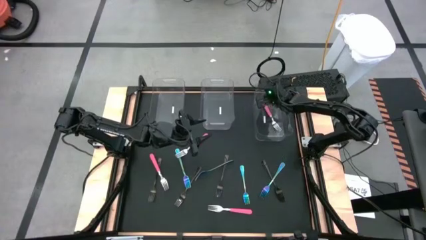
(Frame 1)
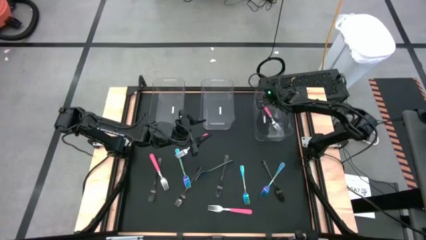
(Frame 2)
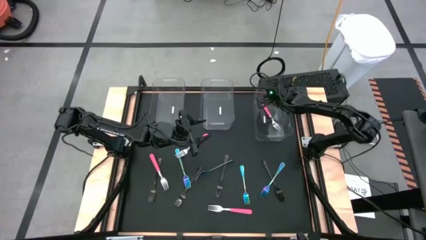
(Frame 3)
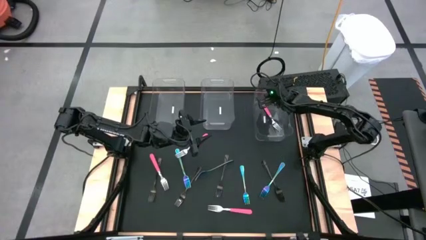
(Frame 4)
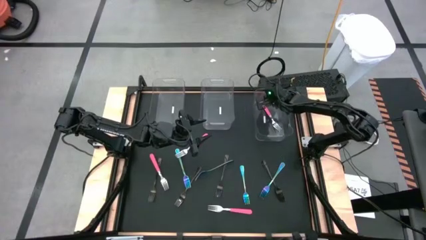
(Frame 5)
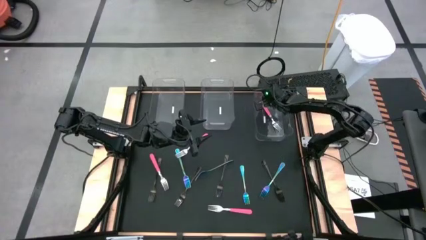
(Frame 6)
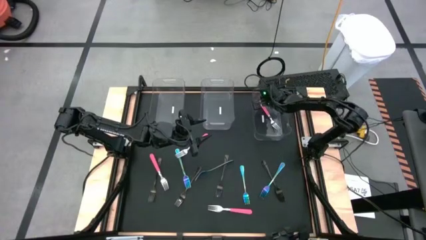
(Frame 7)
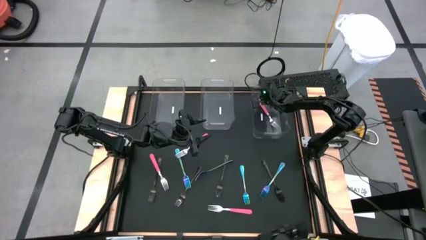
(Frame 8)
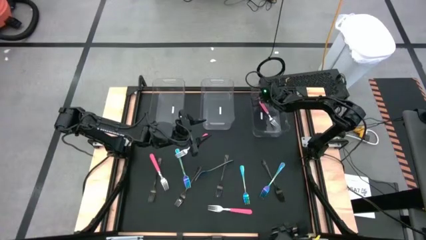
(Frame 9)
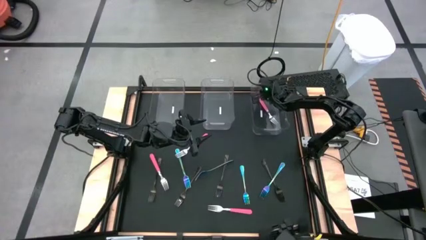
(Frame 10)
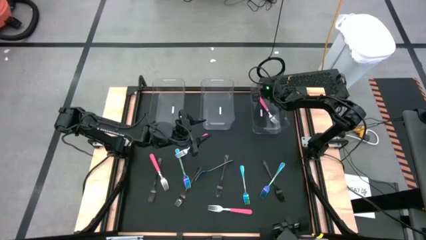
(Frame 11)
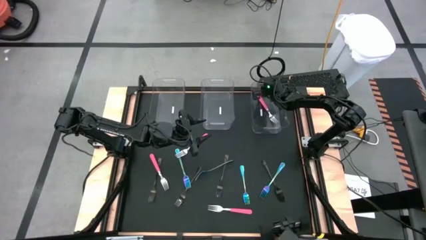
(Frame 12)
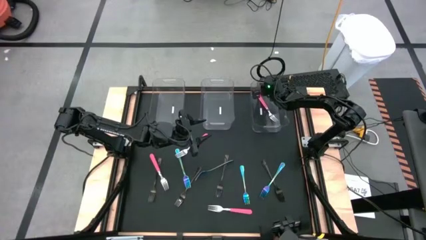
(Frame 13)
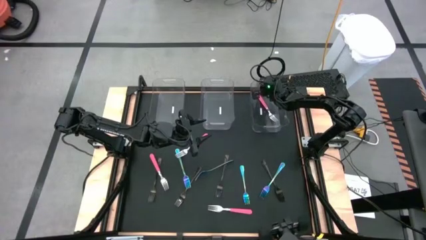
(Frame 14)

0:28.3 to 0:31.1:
Task: Sort silverware by color (type)
Adjust the right transparent bin

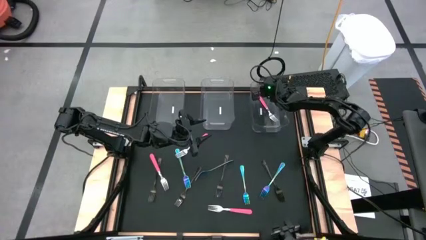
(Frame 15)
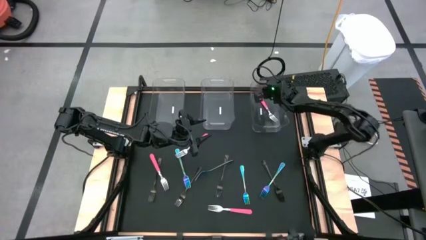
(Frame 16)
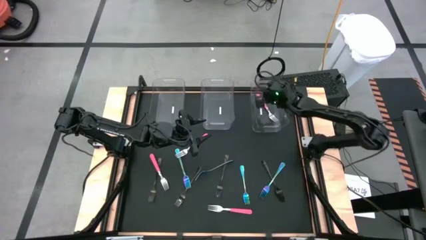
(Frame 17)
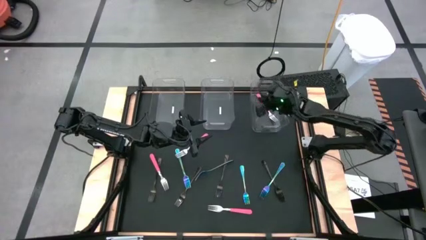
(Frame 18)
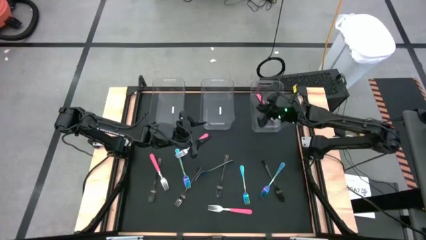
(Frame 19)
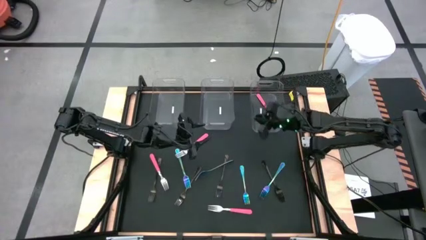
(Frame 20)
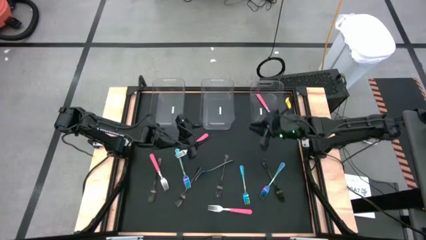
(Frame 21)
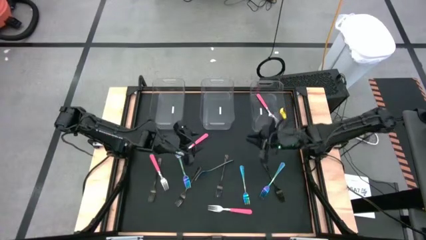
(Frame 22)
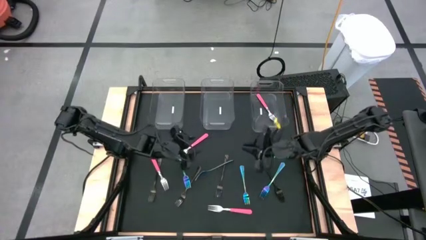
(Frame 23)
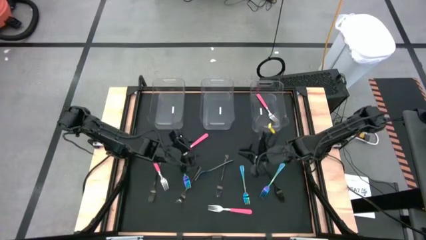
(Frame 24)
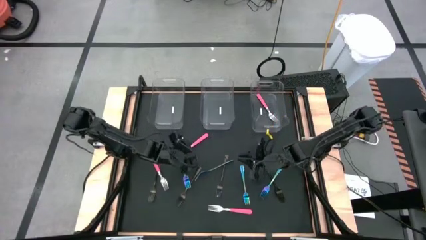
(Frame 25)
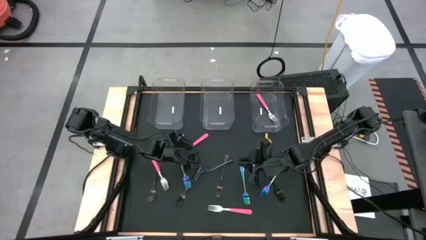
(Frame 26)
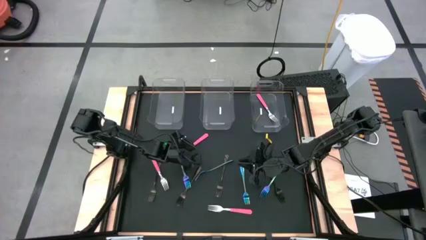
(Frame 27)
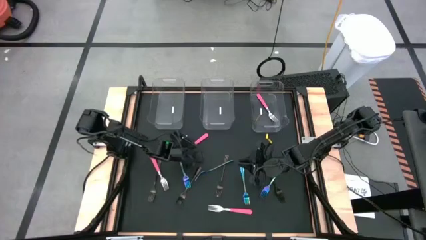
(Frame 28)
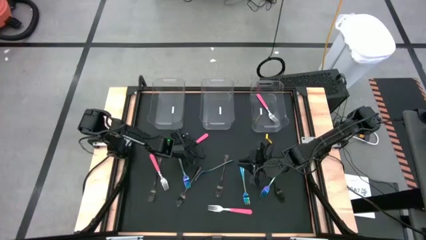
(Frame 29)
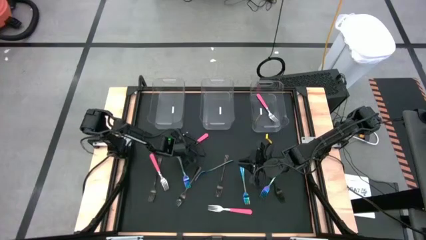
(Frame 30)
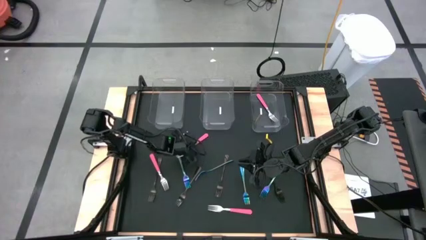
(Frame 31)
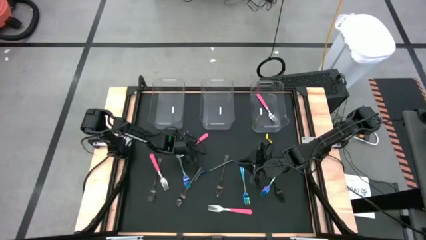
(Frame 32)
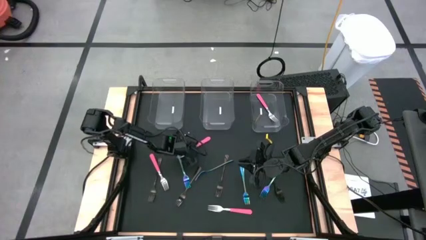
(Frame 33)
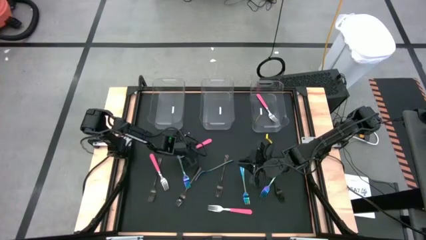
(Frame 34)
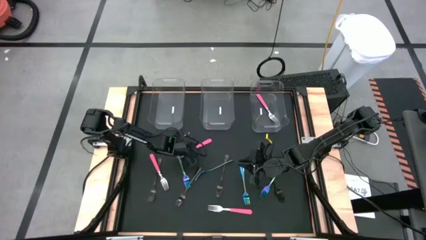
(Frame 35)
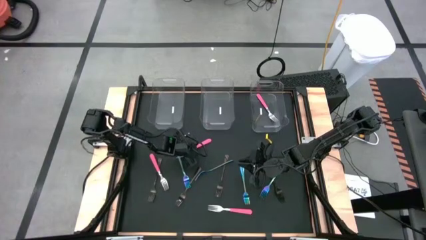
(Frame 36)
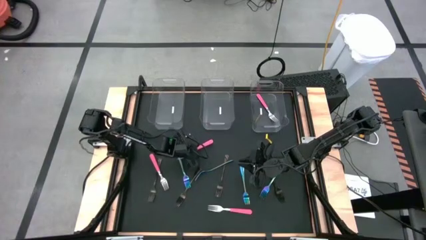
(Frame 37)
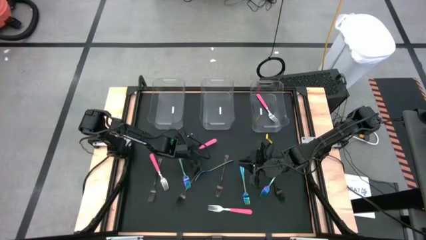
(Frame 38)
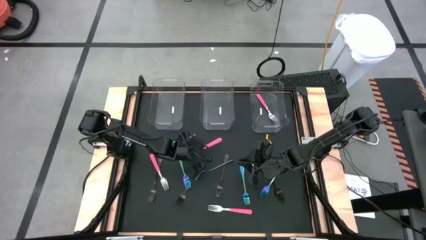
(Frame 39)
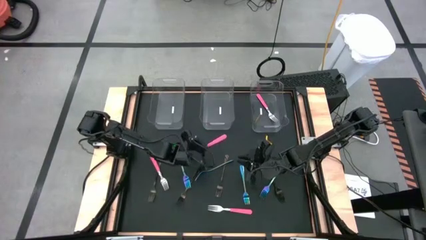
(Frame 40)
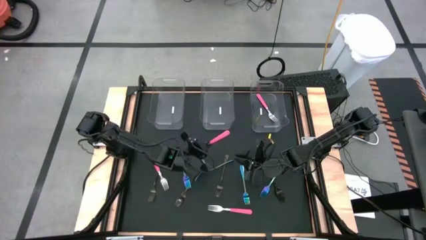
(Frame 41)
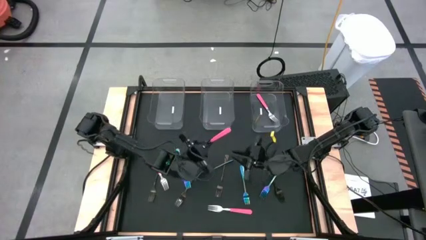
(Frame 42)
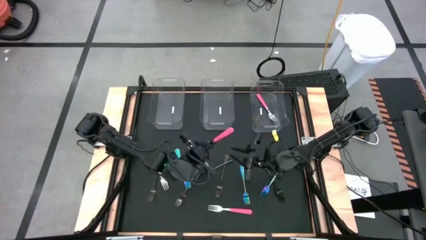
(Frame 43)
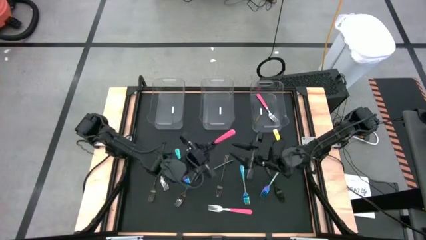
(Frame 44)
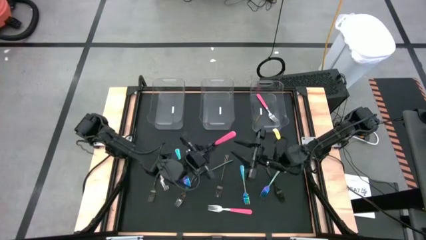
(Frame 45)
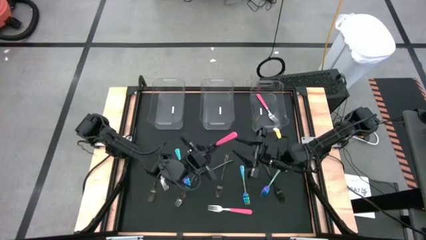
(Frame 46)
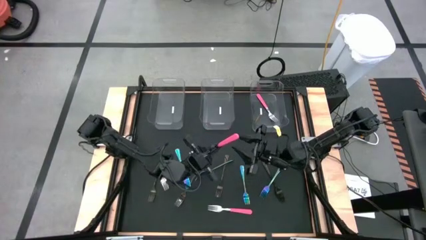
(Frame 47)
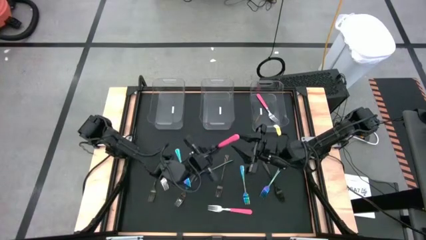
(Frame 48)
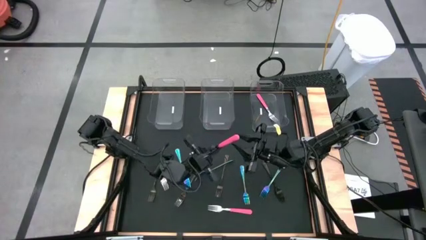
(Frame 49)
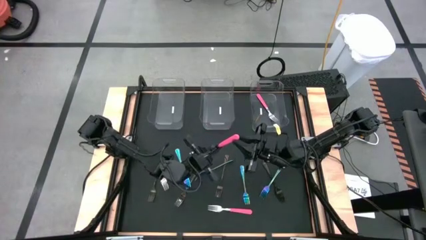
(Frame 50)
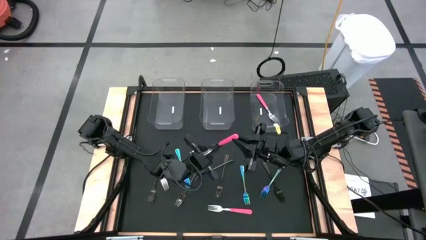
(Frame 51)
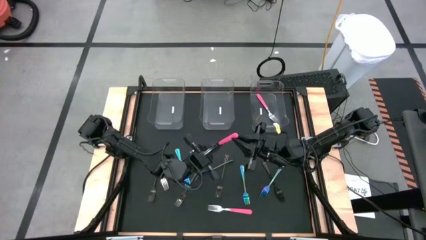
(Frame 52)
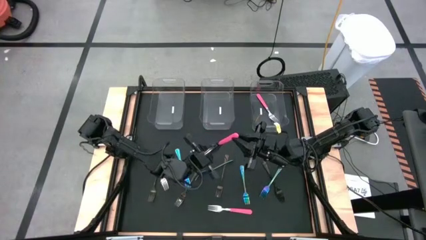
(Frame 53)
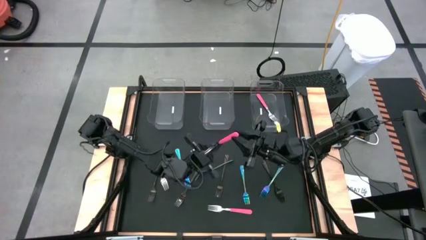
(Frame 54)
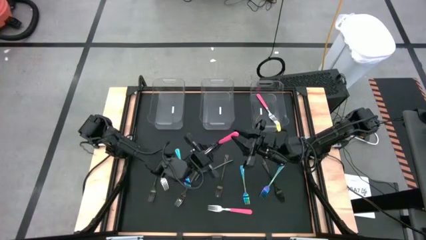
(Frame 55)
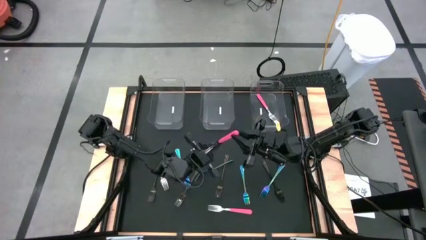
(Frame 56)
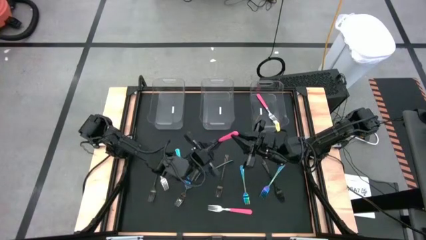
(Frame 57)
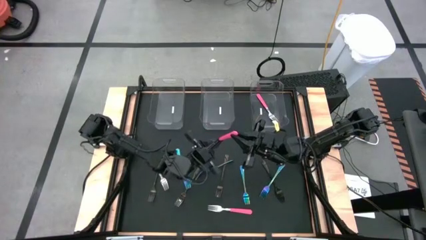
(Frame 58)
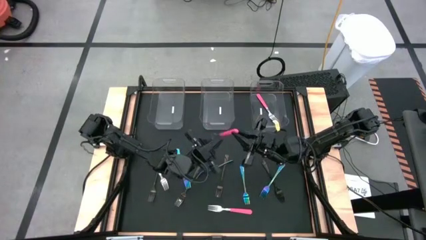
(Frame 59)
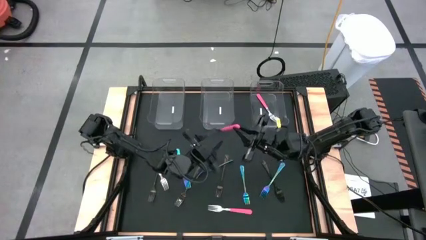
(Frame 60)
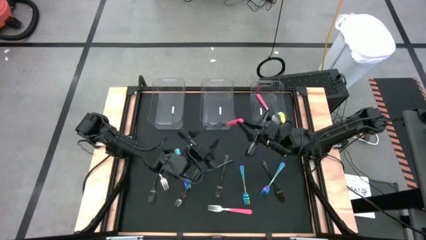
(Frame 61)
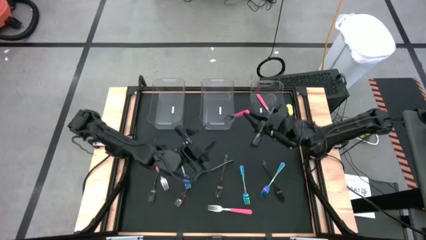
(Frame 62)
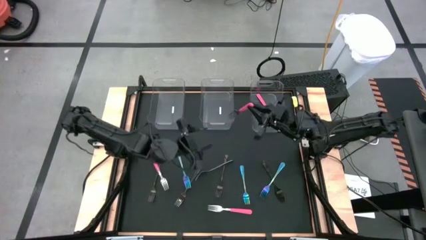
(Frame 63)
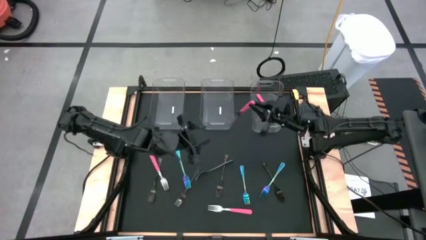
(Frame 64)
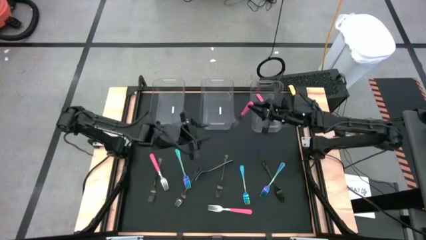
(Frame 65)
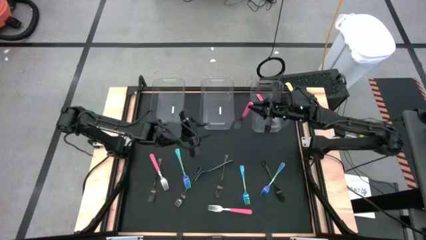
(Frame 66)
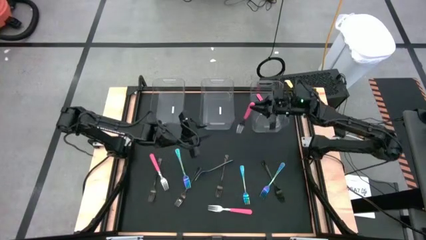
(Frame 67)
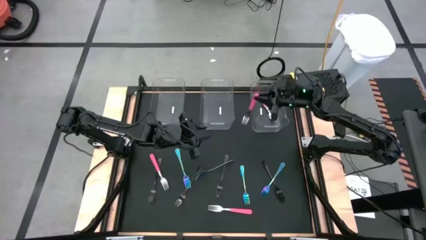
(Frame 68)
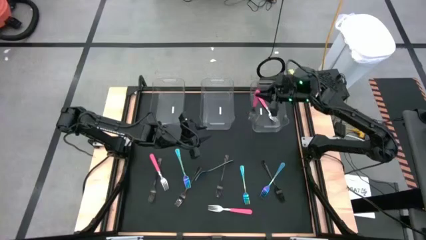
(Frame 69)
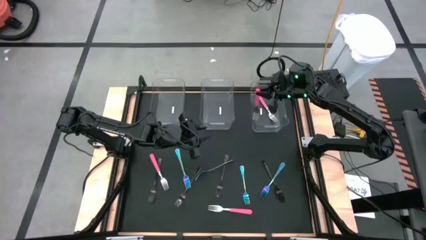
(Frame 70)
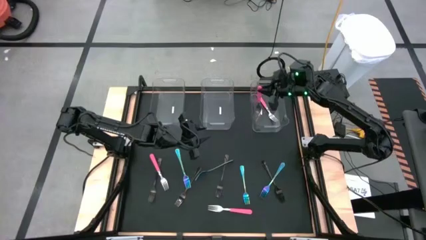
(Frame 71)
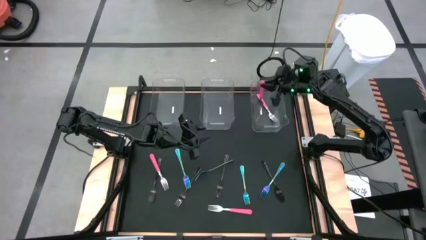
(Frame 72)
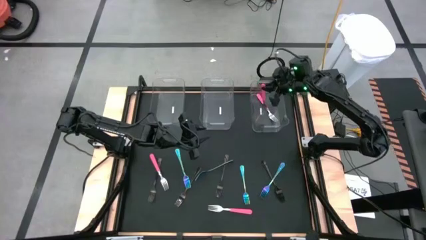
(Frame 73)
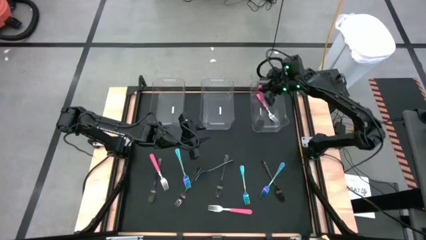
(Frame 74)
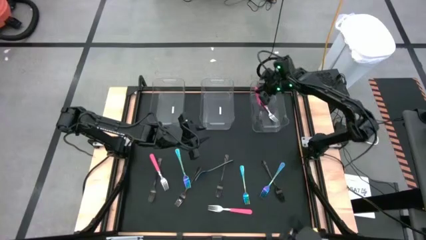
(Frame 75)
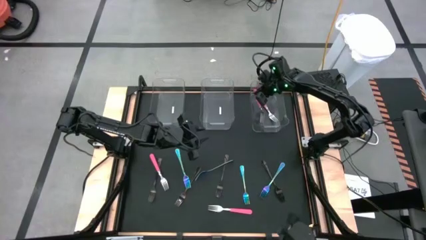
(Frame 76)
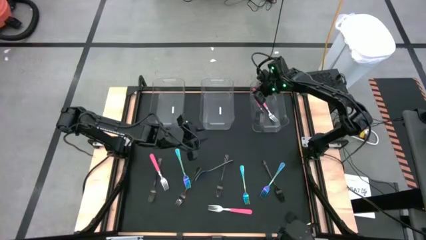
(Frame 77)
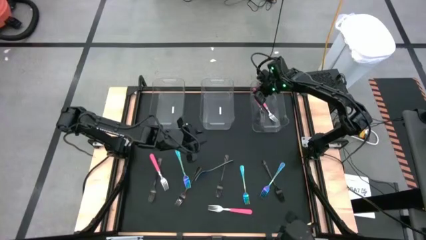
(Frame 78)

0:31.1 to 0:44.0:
Put the pink fork into the right transparent bin
